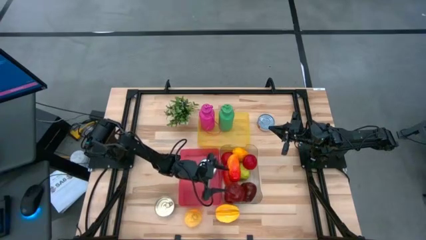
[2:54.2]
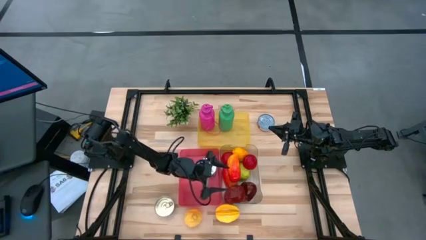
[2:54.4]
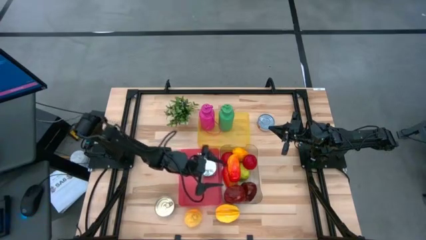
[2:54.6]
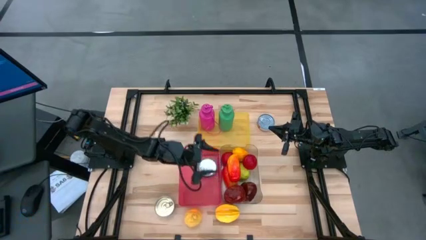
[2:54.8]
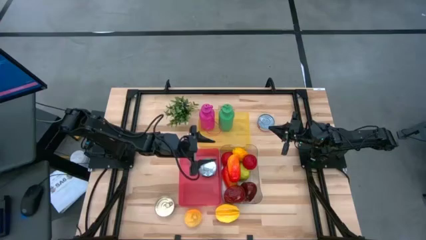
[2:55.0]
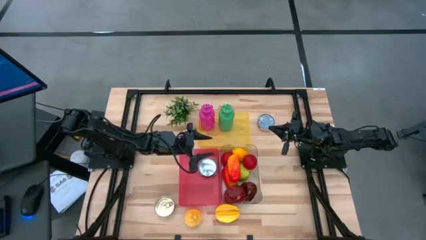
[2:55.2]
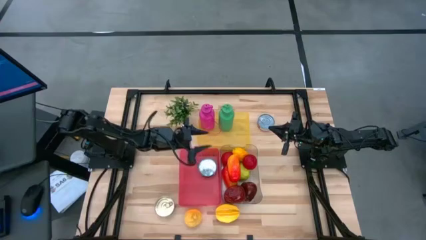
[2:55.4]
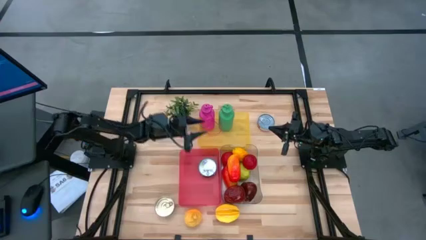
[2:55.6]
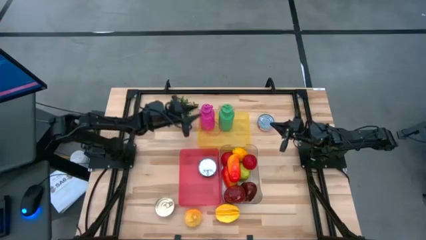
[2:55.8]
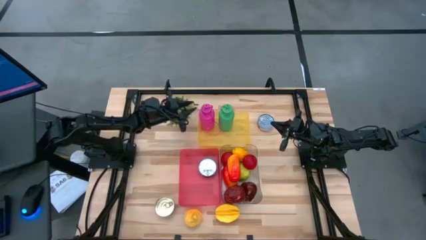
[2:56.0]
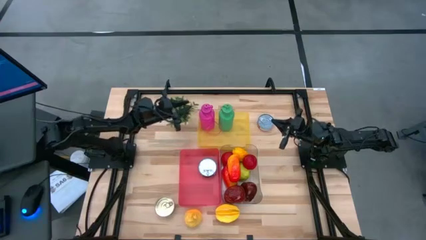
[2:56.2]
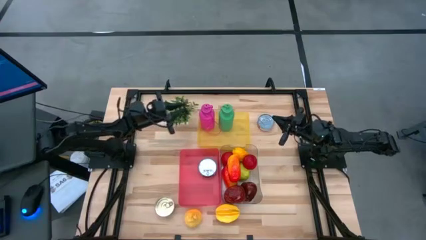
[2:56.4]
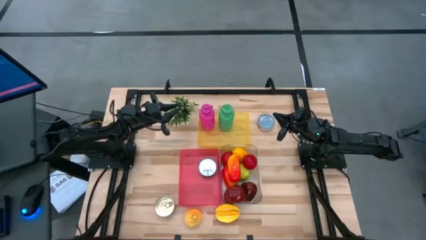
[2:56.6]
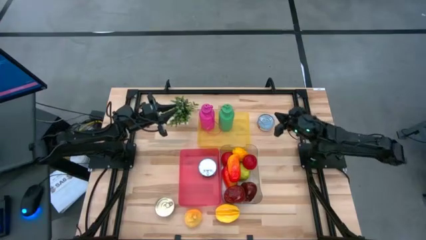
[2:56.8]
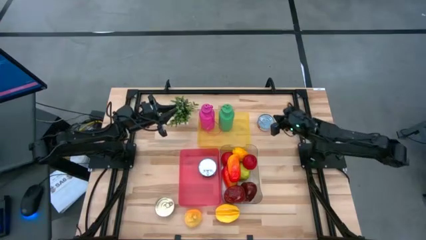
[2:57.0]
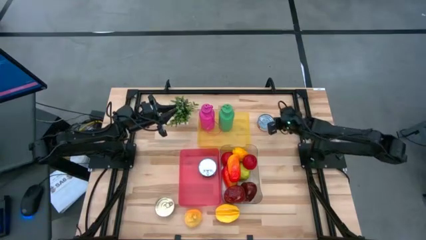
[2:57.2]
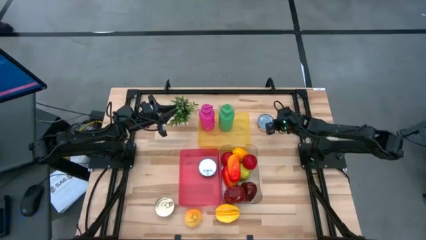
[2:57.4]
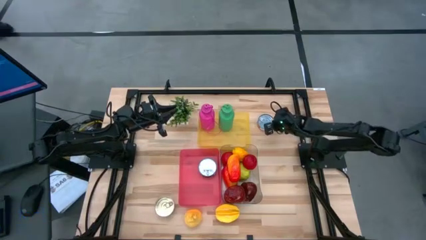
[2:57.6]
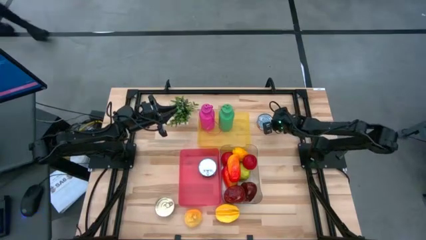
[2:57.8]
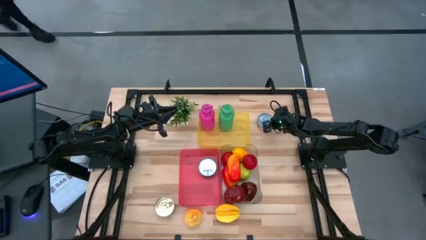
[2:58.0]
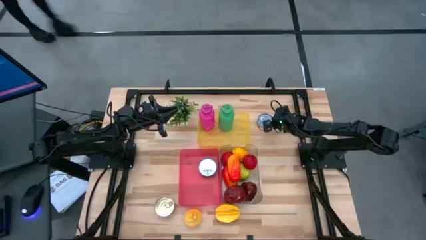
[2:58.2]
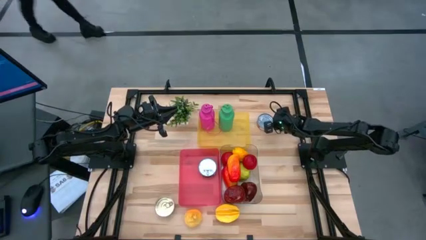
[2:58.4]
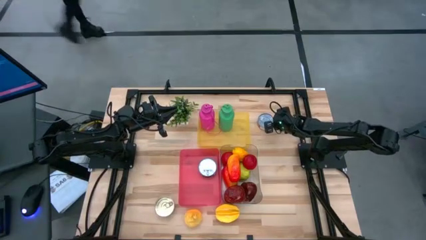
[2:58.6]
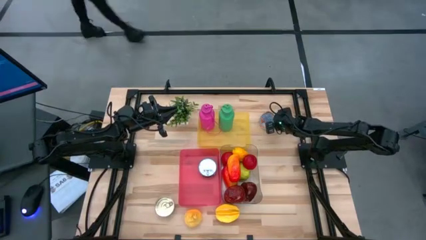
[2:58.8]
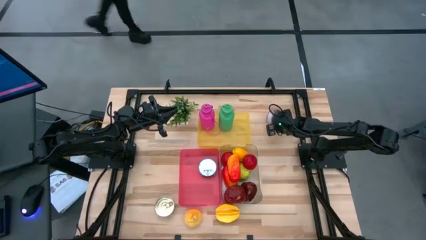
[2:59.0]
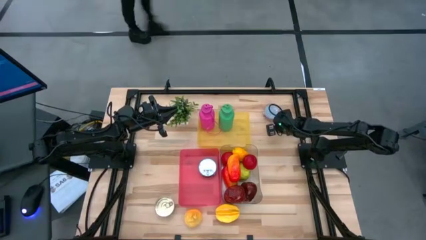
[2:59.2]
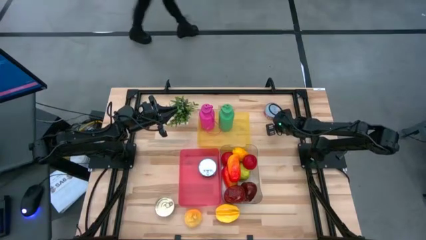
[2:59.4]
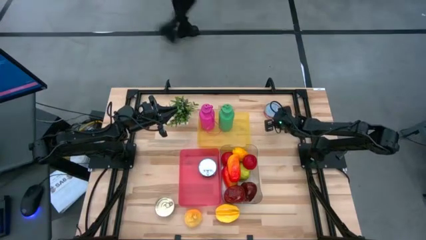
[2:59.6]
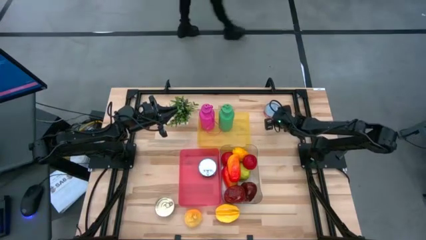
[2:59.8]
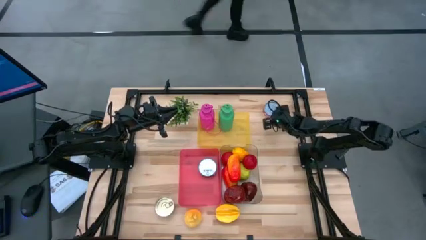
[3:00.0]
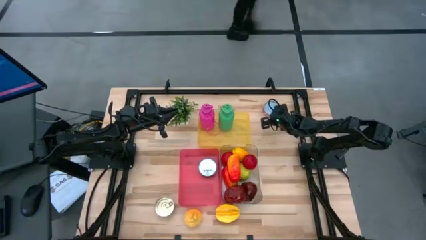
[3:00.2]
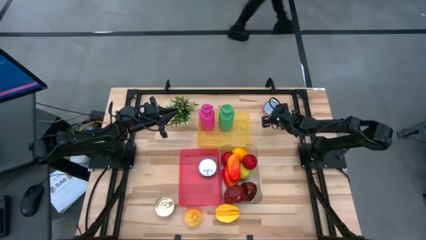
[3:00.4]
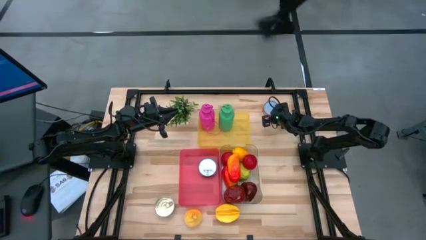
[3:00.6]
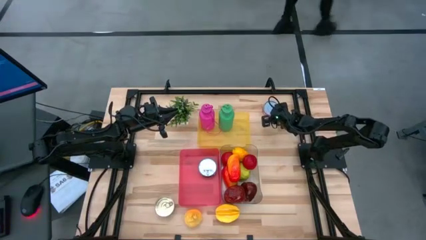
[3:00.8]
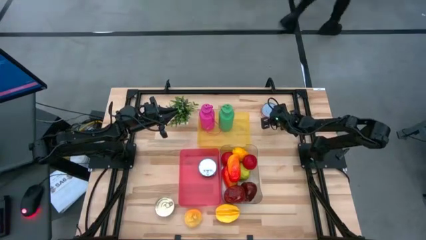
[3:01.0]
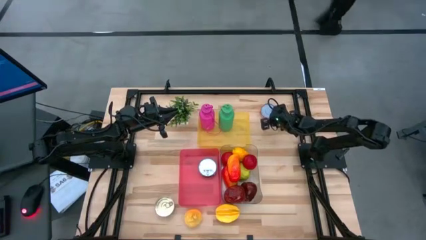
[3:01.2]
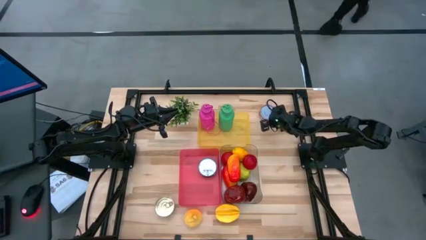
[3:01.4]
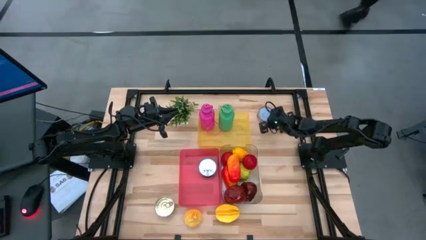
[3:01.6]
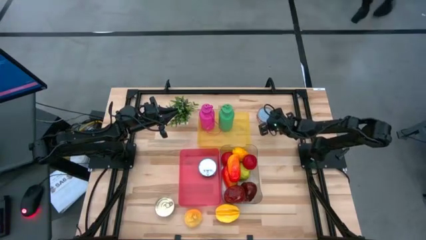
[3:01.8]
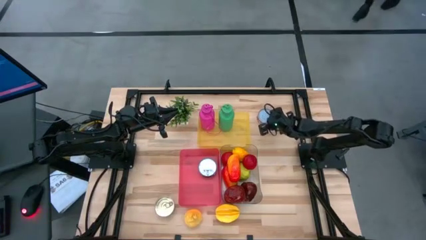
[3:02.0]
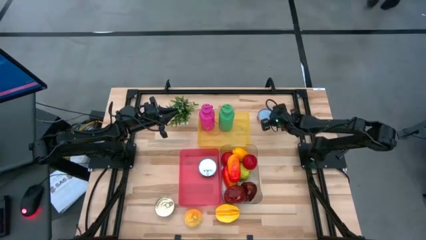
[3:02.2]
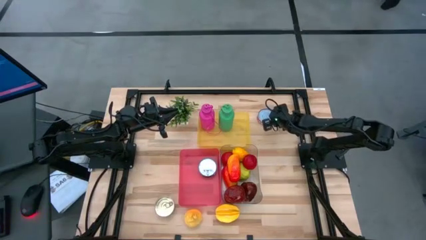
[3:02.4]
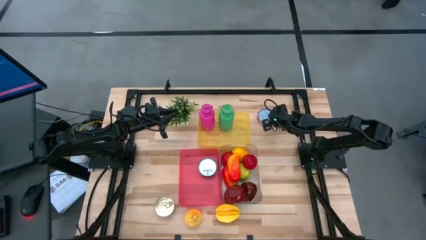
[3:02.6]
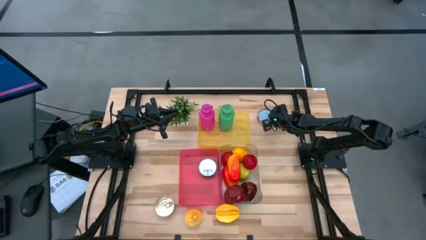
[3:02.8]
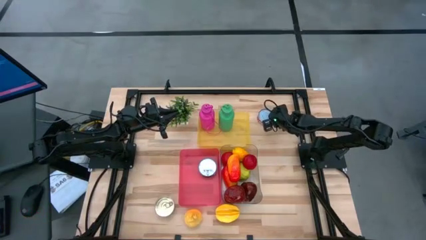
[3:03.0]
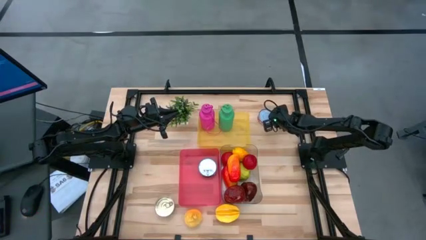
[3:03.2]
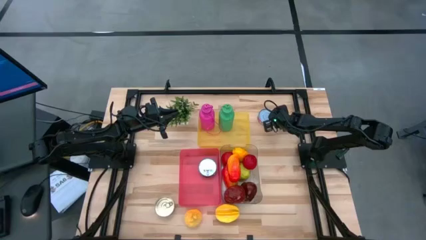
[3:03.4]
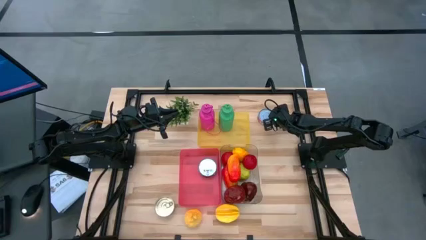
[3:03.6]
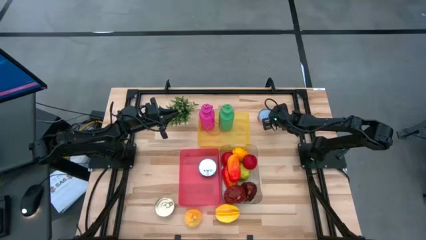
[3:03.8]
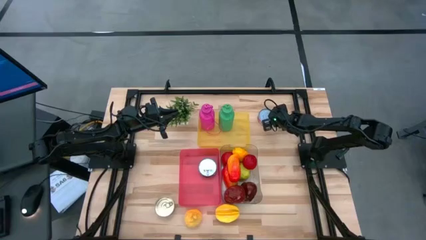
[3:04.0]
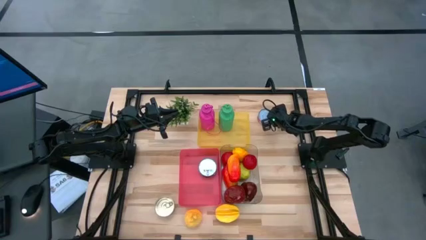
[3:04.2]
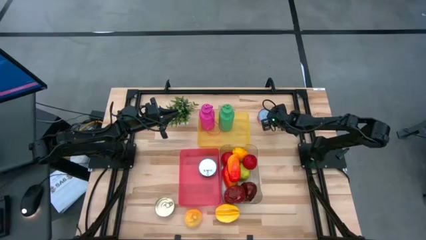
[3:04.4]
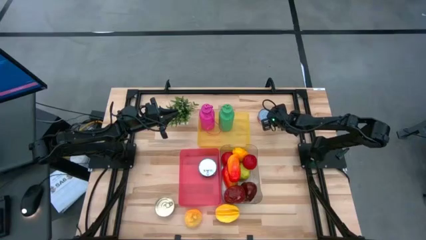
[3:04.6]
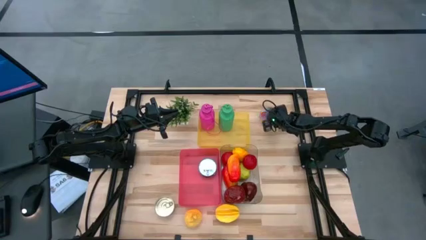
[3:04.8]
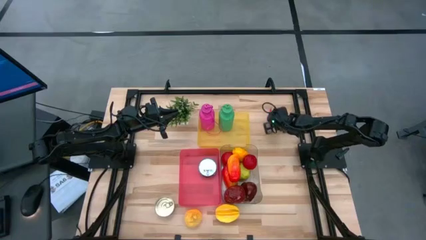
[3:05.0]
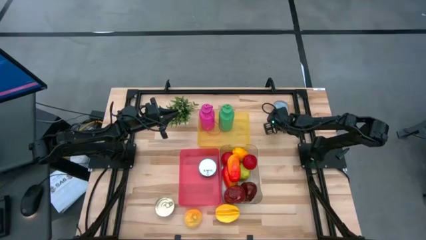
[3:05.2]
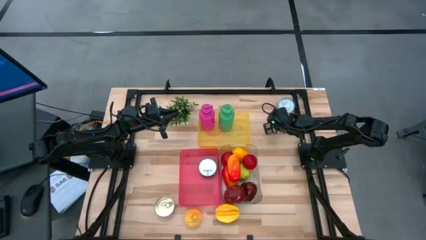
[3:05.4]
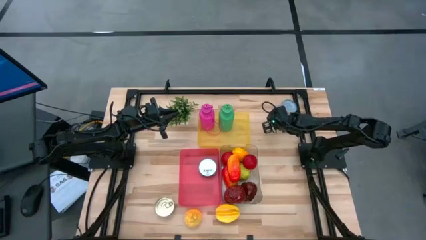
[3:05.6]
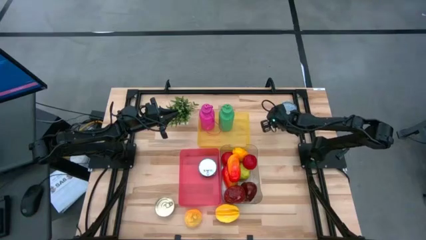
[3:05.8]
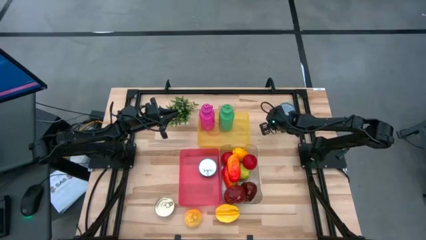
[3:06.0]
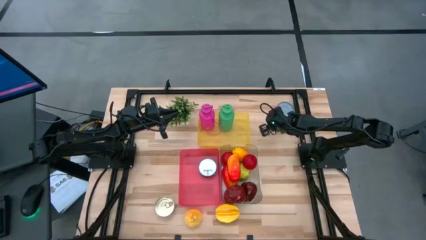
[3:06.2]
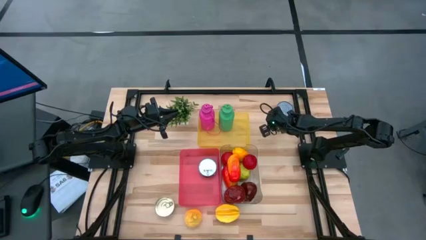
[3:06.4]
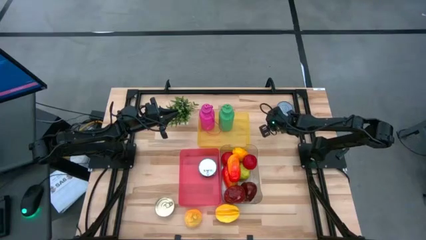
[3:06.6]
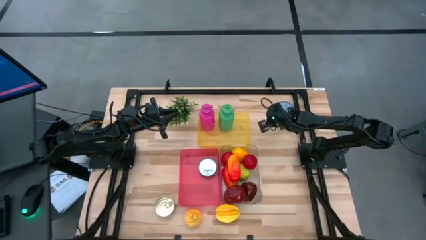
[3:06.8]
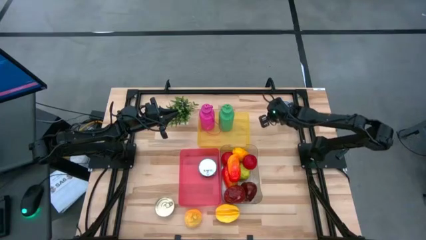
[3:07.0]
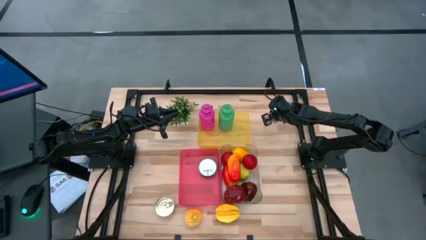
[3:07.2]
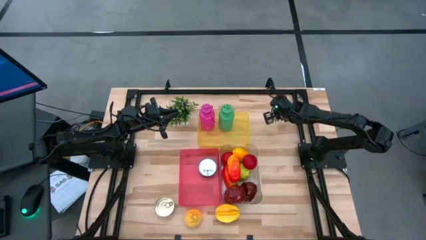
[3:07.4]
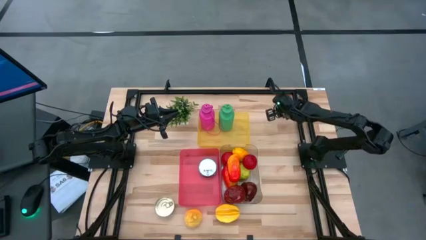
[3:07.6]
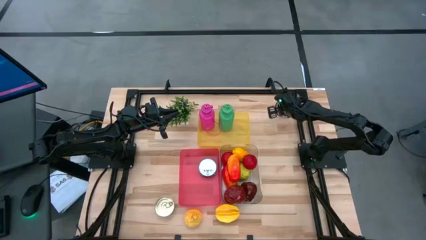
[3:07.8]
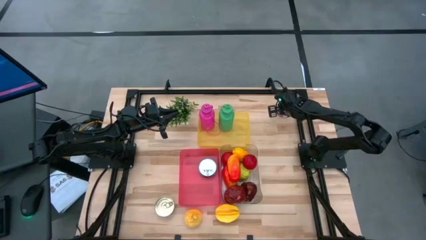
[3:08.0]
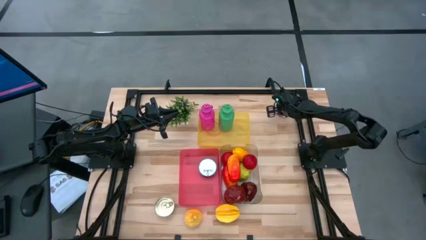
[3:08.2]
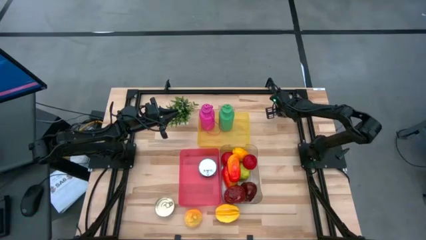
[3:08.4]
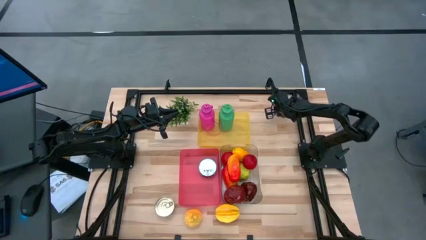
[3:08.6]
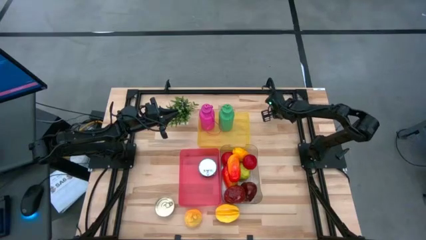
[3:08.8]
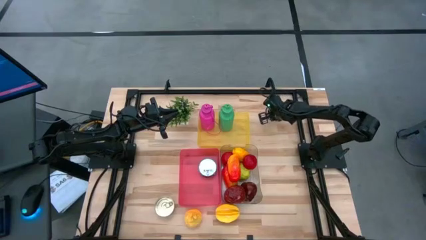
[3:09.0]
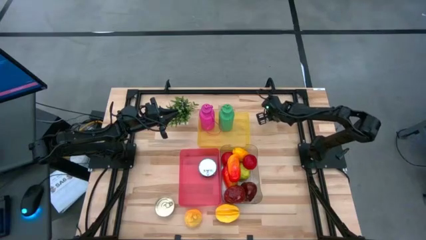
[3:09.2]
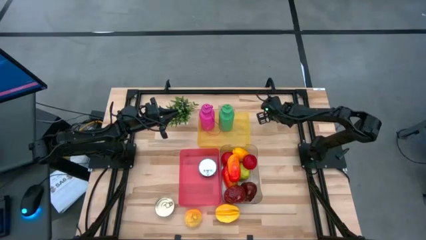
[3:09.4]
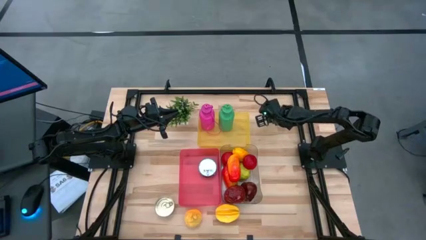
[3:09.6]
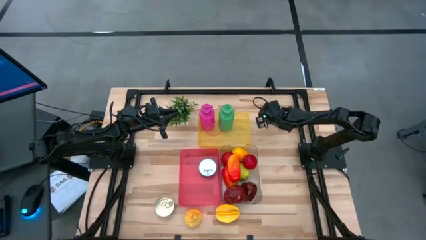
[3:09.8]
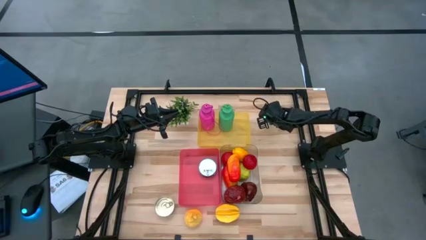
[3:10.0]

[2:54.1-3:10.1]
Task: Pick & Place Food Item
Put the red tuna can into the red bin
